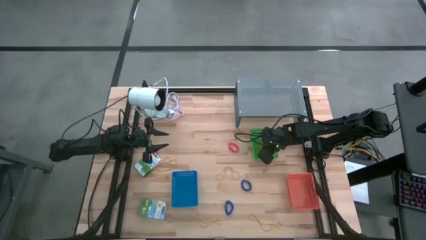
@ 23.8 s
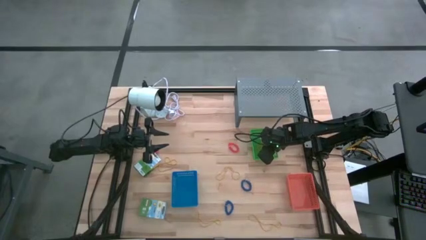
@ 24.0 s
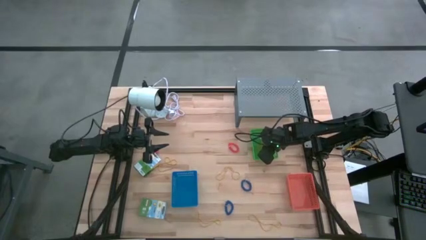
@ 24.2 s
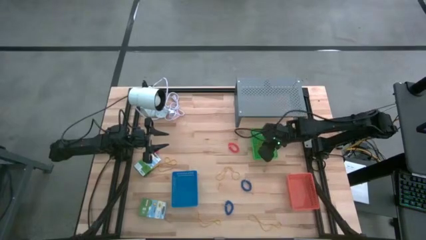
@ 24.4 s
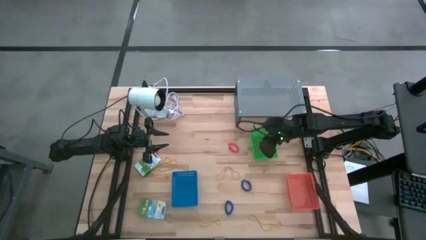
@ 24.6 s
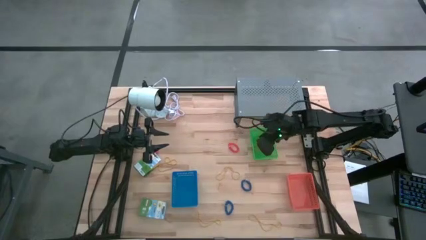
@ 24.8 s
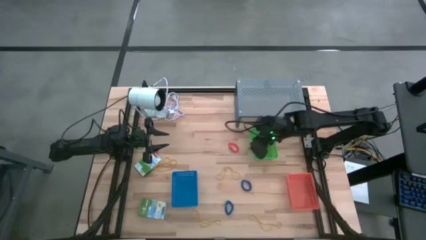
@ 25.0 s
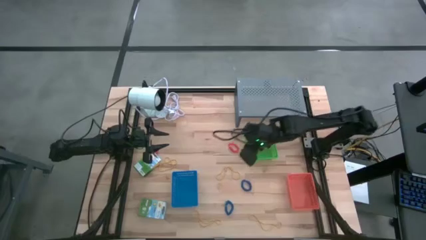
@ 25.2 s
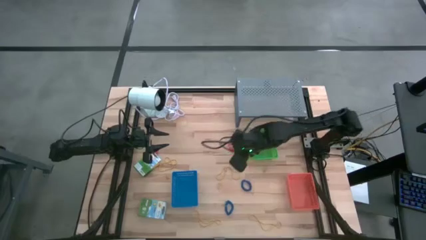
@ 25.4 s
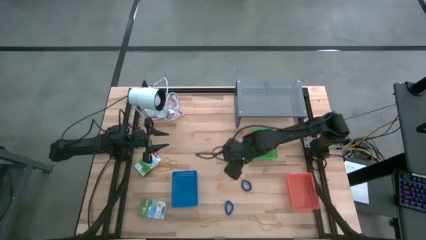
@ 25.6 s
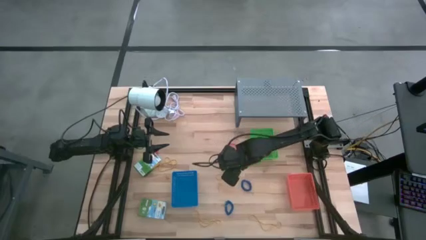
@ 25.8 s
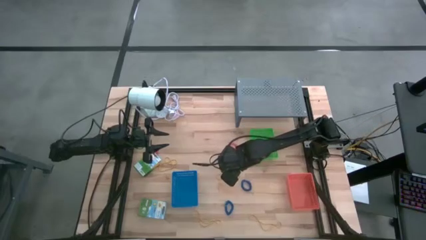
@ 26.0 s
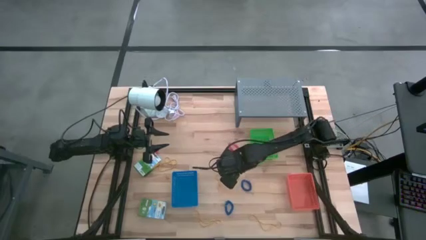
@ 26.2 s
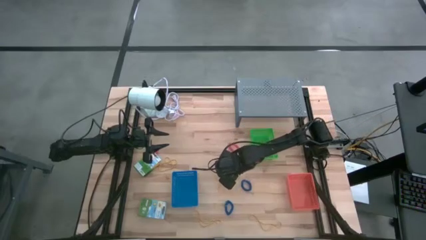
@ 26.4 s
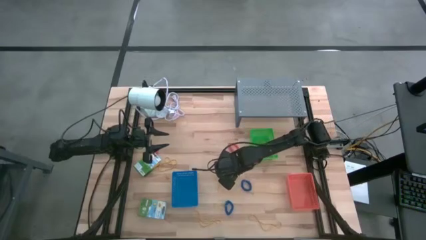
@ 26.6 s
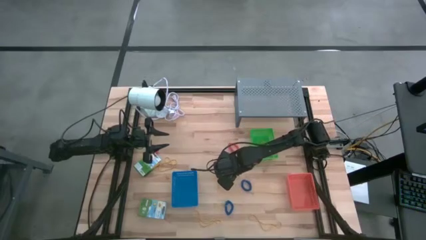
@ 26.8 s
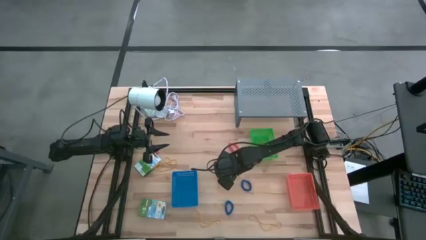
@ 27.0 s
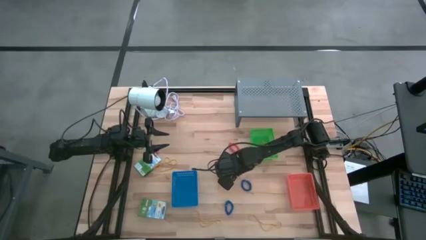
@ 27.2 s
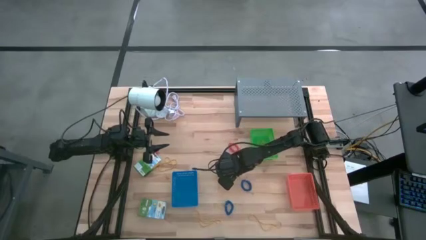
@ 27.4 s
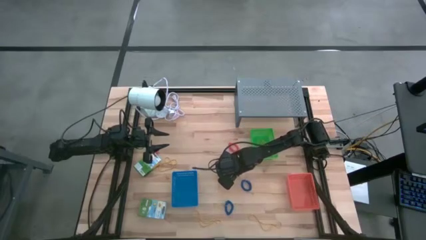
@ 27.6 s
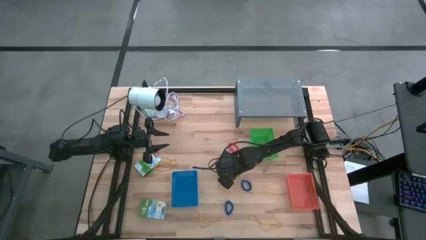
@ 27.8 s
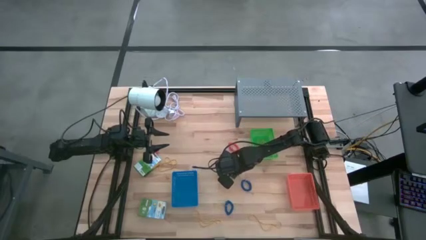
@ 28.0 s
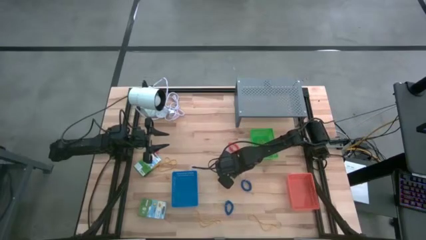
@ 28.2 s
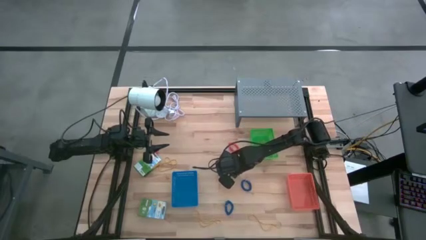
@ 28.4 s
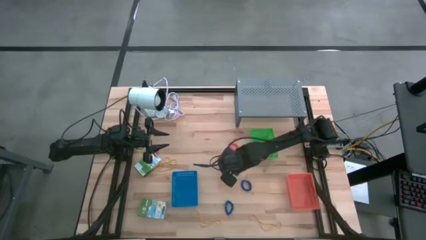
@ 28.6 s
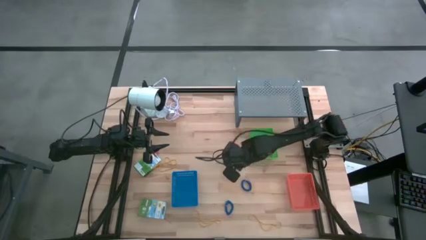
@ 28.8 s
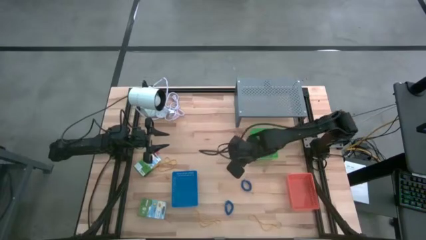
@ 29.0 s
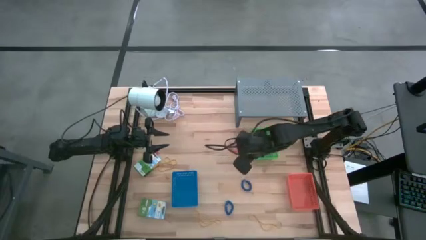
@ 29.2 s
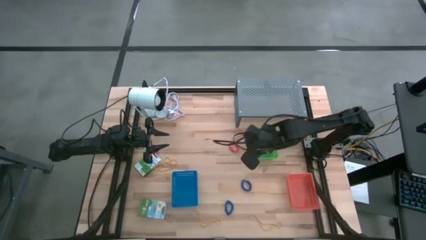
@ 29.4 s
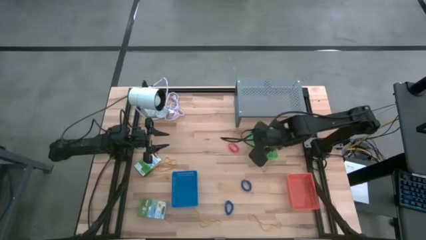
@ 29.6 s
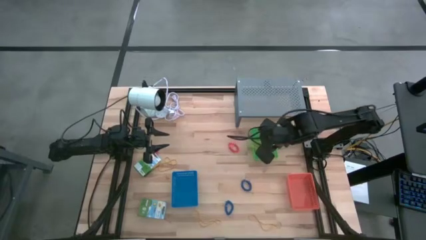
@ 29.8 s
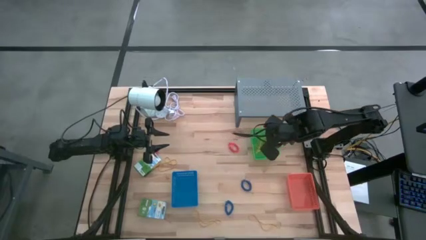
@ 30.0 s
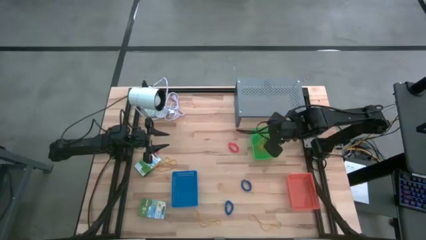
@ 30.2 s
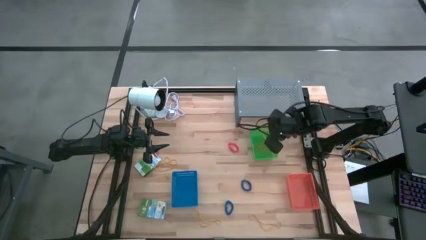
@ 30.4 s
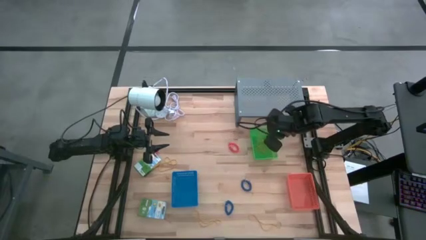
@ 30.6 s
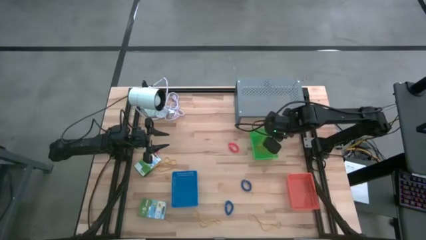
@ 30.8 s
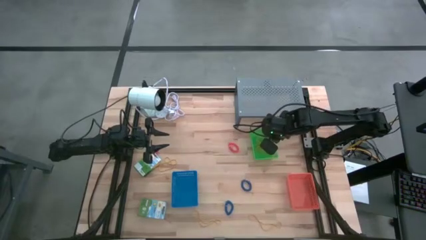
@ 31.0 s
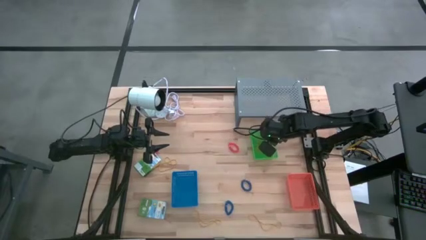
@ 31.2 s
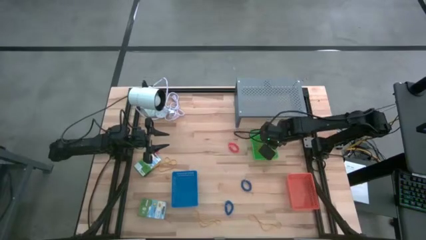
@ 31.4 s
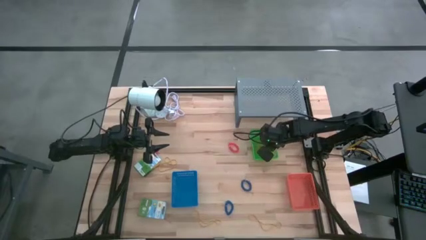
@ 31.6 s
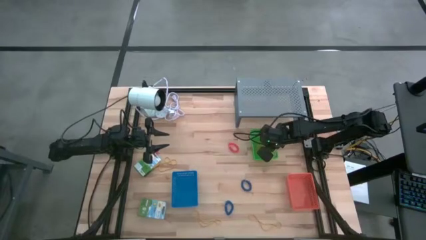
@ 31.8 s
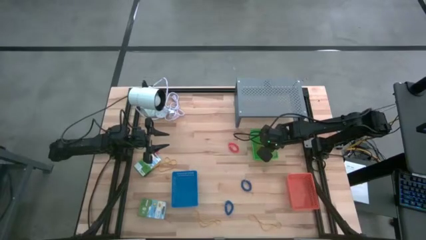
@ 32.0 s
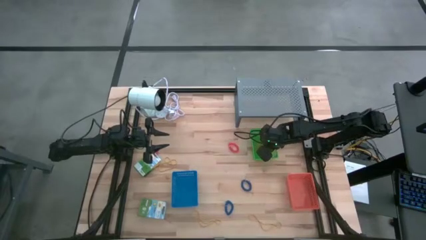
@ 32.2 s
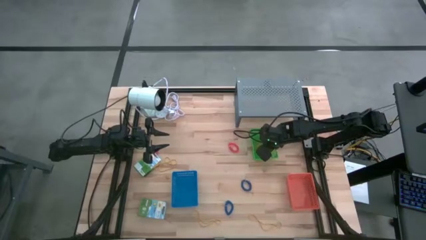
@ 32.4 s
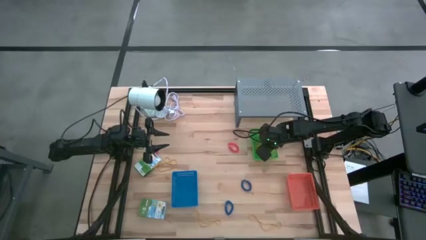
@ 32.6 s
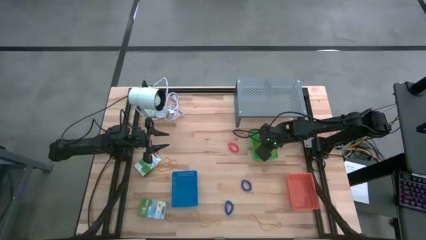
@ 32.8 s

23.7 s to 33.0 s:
Task: Pick & Place Office Desk Supplies
Put the yellow rubber band into the green bin

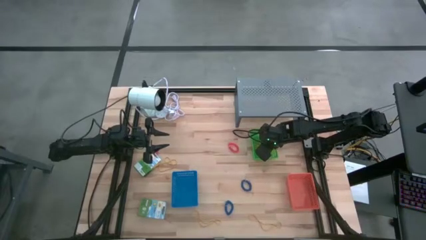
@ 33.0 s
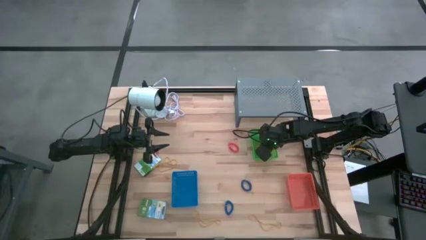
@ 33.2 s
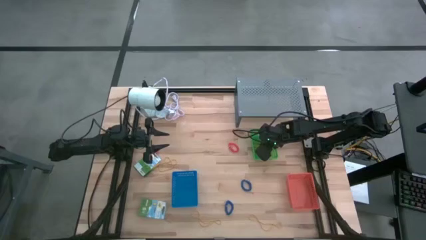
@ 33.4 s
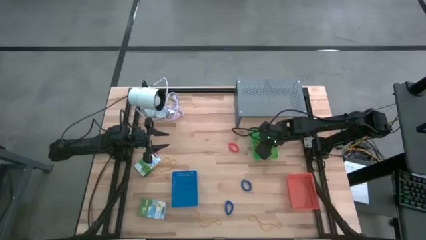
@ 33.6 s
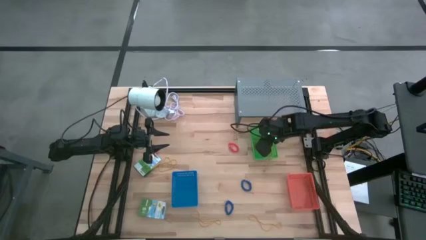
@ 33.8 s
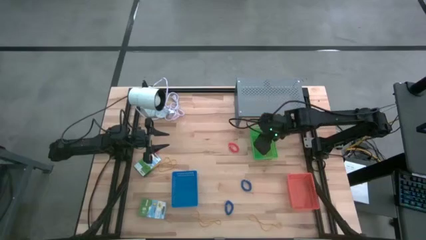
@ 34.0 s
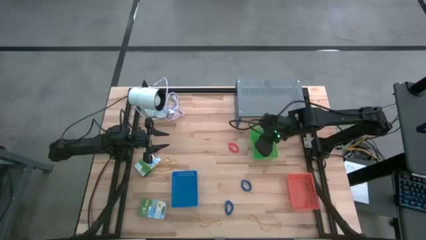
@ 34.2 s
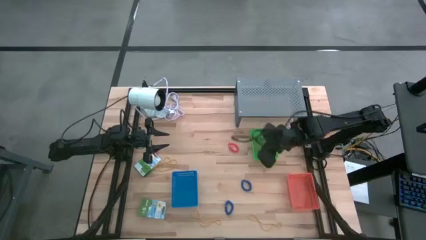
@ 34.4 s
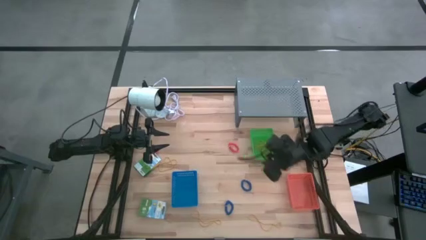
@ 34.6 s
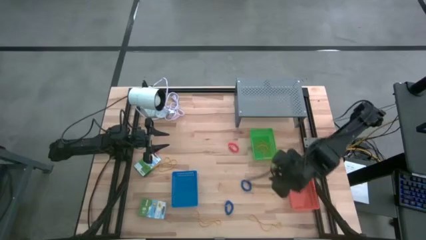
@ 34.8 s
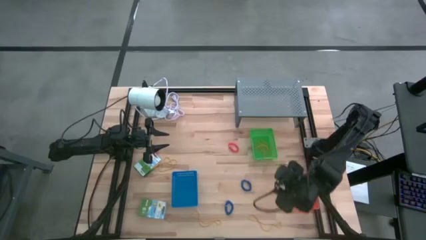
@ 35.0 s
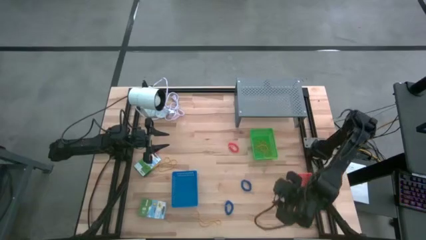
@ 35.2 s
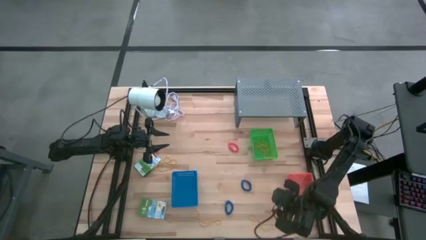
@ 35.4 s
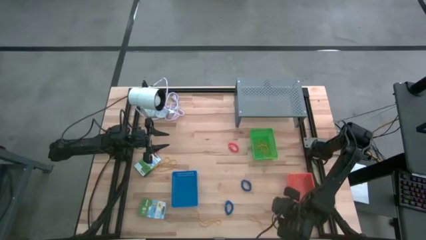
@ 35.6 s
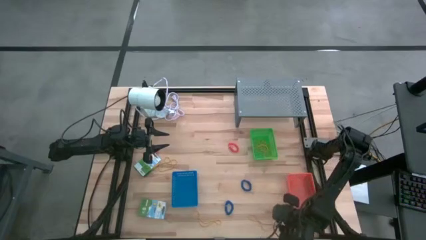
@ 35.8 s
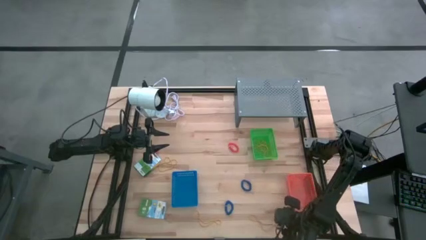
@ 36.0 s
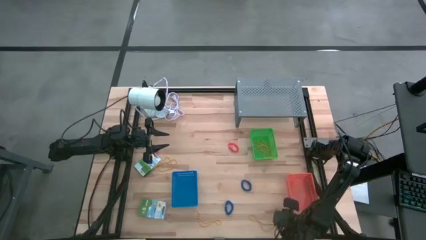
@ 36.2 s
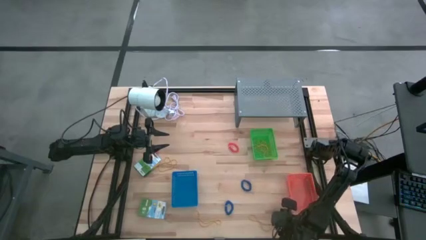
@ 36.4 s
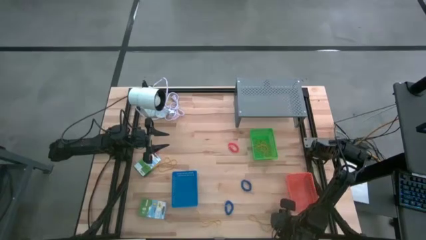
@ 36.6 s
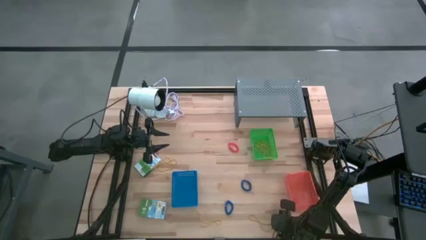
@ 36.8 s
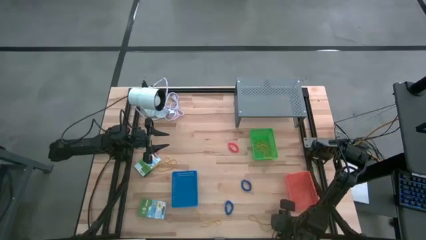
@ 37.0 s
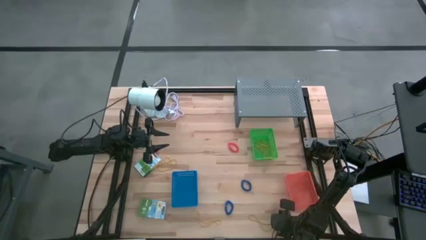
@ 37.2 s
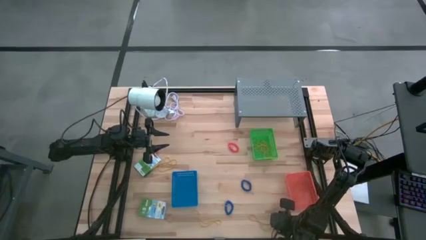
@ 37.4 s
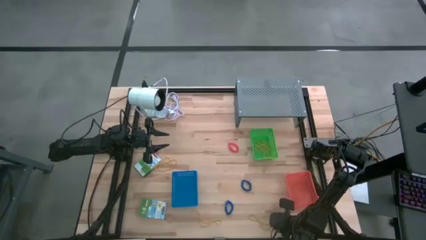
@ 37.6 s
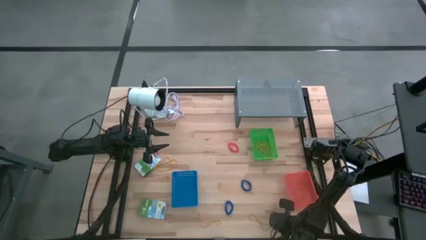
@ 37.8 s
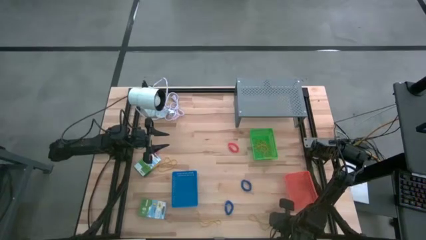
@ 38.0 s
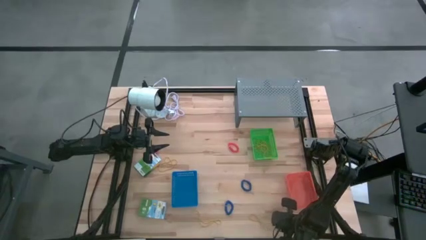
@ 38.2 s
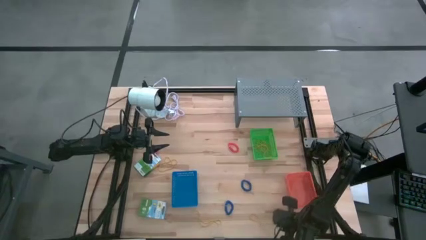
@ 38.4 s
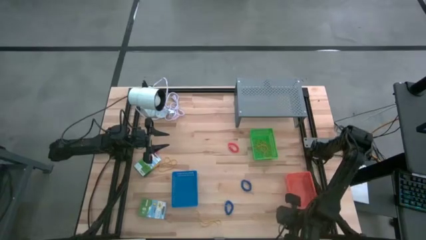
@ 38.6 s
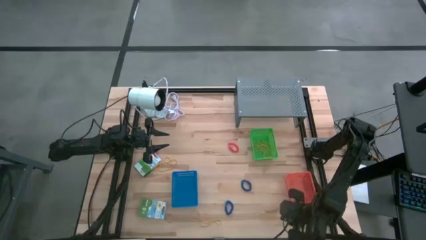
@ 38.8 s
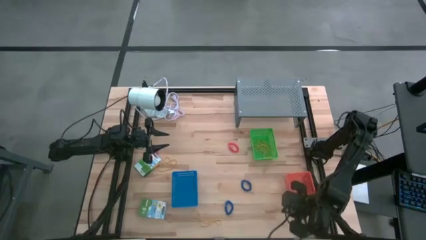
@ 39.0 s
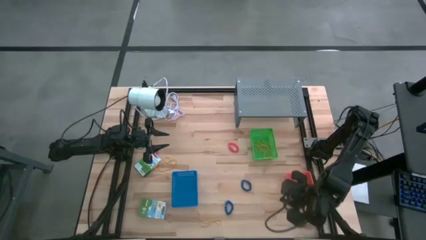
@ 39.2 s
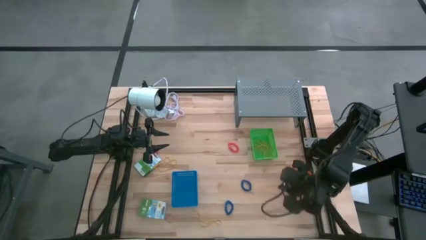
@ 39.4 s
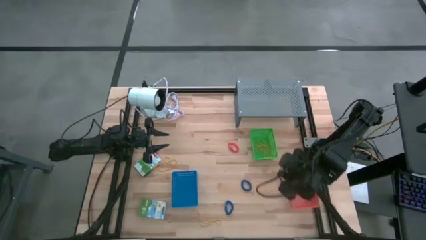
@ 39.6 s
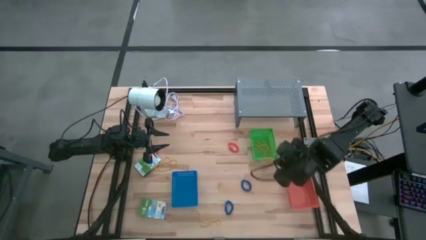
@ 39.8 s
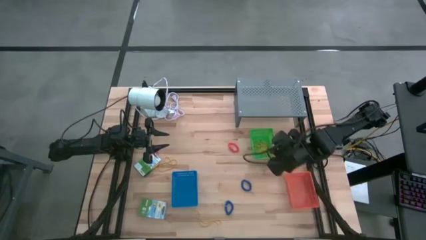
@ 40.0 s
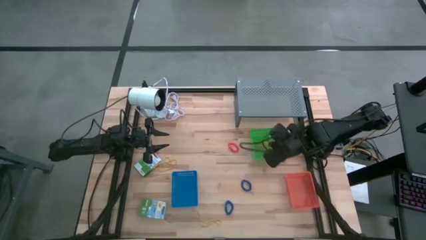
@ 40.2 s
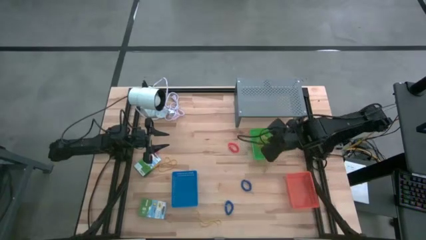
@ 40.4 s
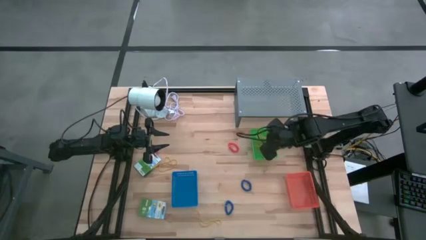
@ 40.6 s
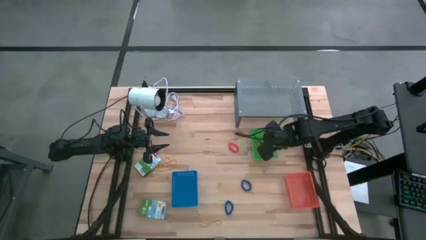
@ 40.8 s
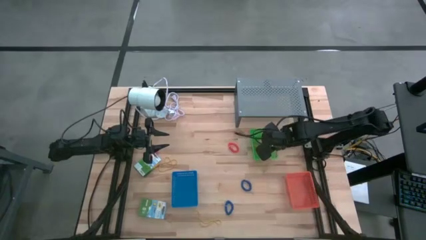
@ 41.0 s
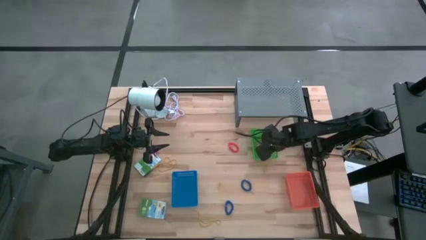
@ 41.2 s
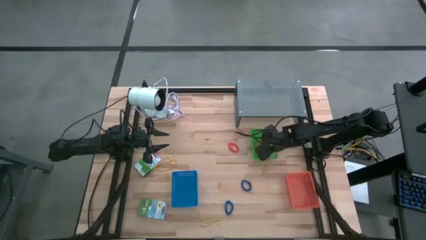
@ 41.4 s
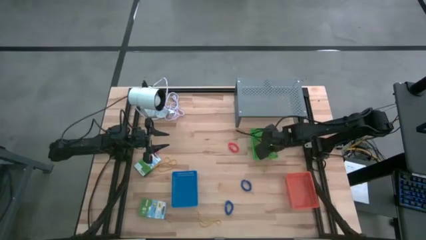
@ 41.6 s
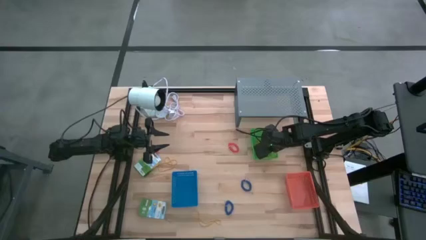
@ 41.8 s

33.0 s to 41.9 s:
Put the yellow rubber band into the green bin
